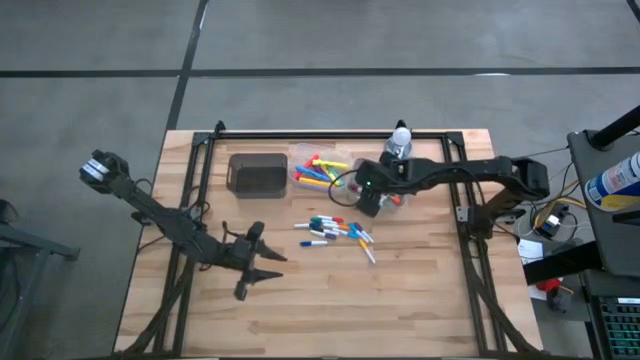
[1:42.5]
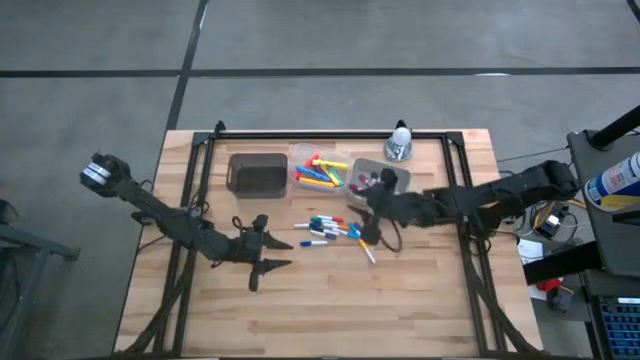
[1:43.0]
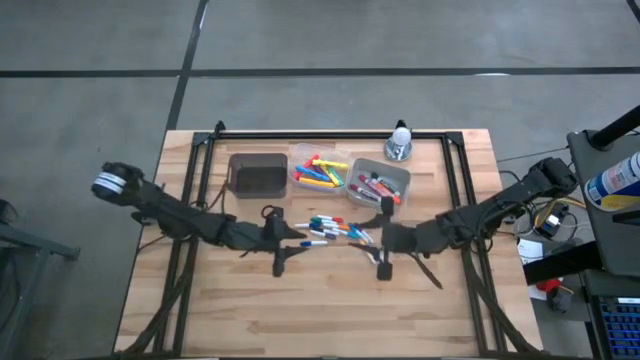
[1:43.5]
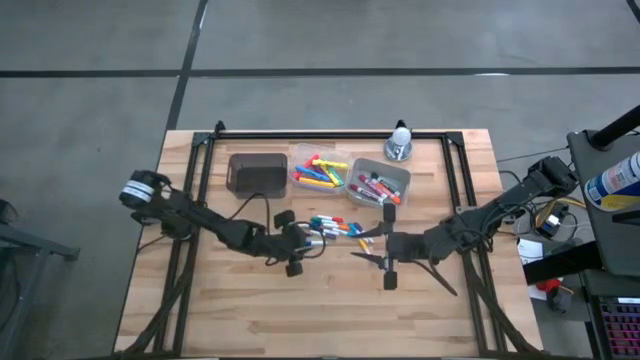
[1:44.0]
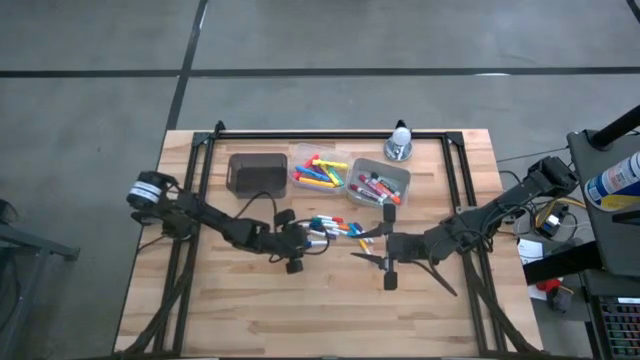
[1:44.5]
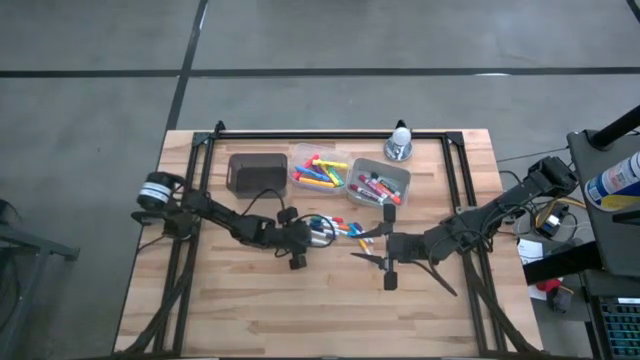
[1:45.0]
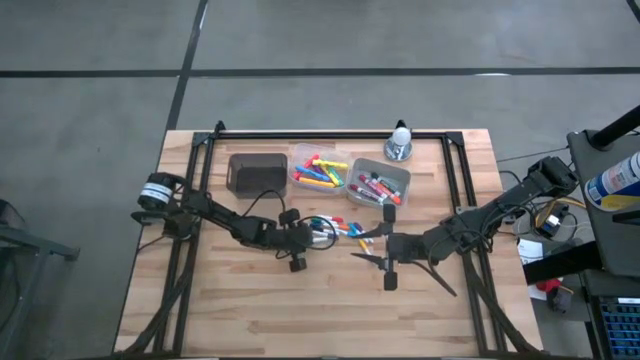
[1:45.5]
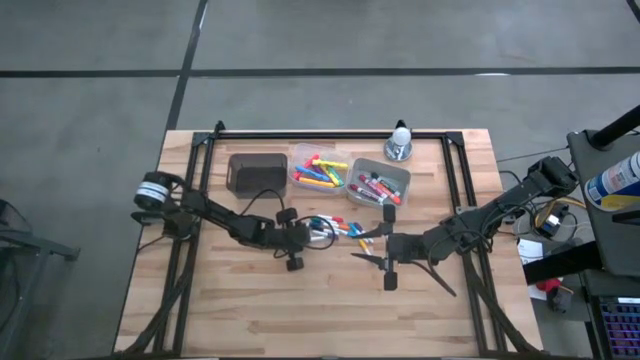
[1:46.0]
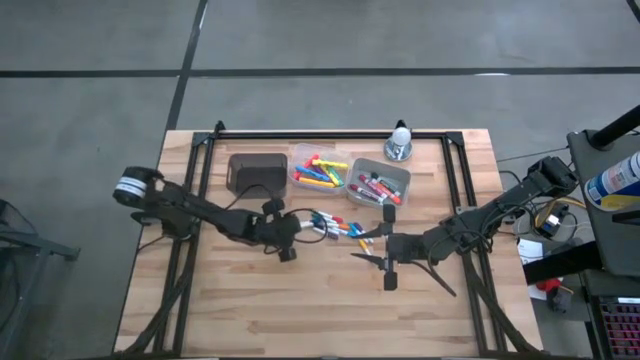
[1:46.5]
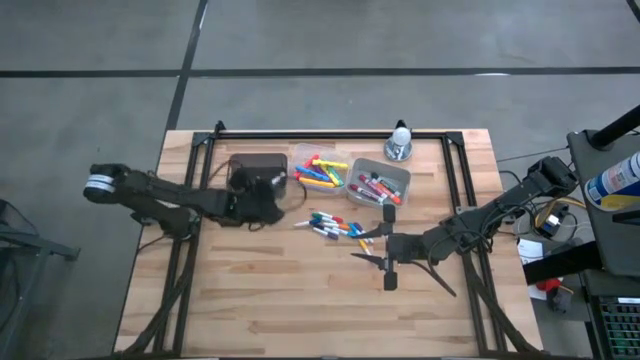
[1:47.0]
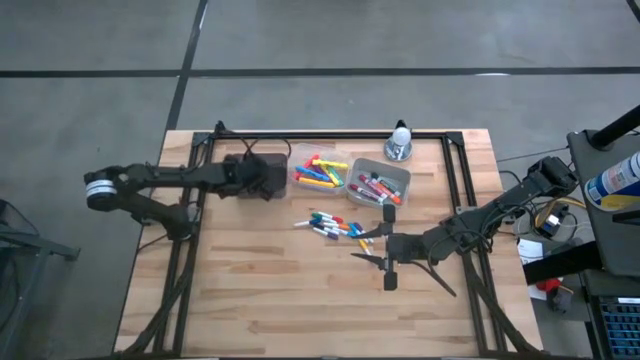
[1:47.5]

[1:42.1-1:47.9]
Task: Pick & Place Markers
Put the blue mini marker into the black bin

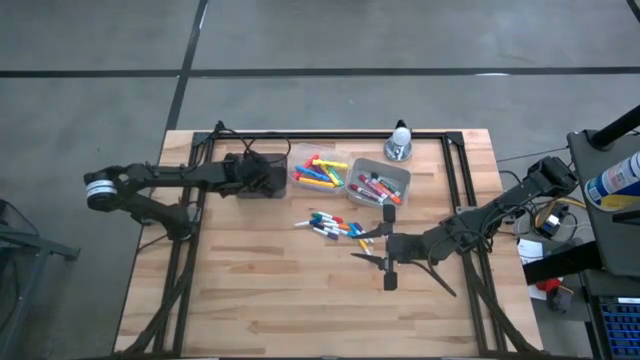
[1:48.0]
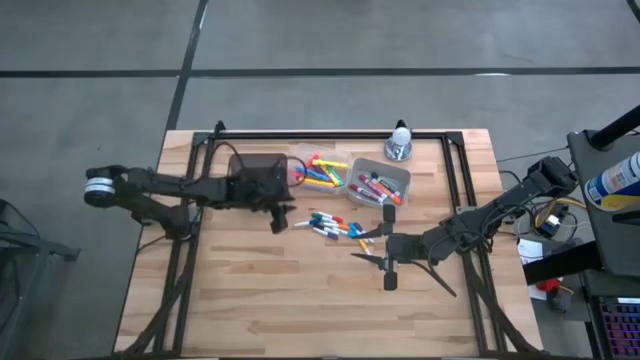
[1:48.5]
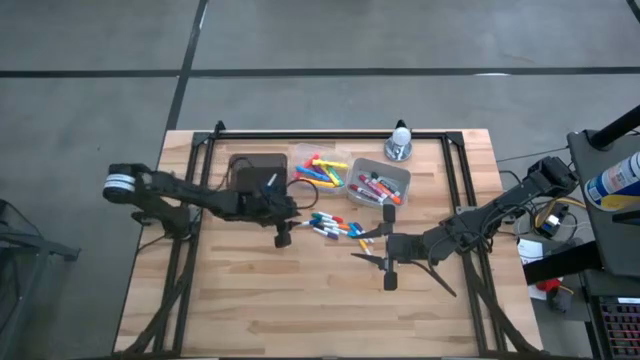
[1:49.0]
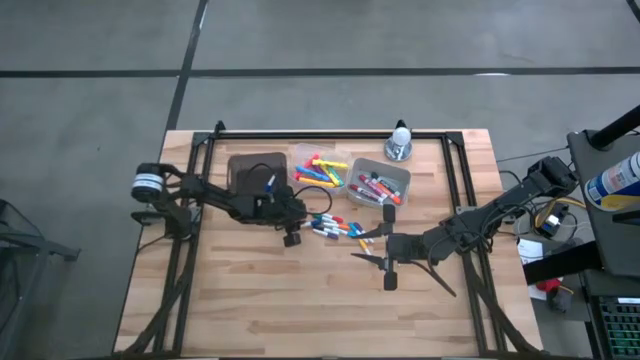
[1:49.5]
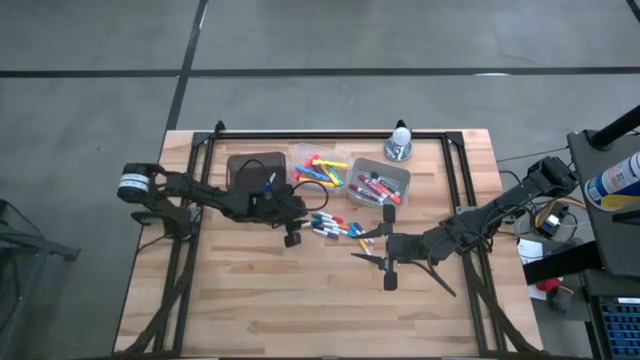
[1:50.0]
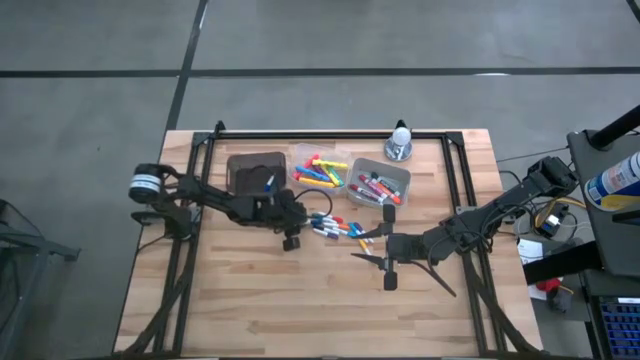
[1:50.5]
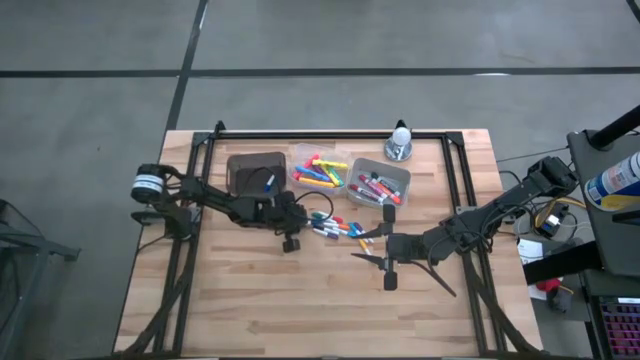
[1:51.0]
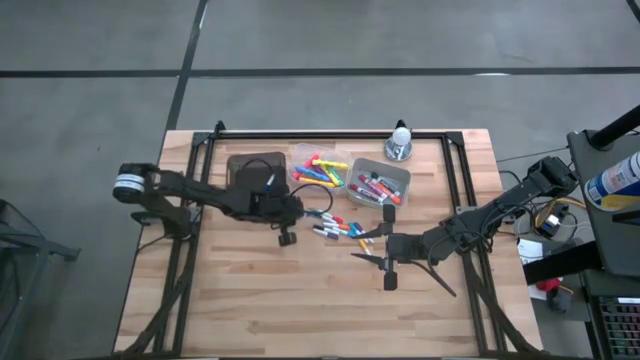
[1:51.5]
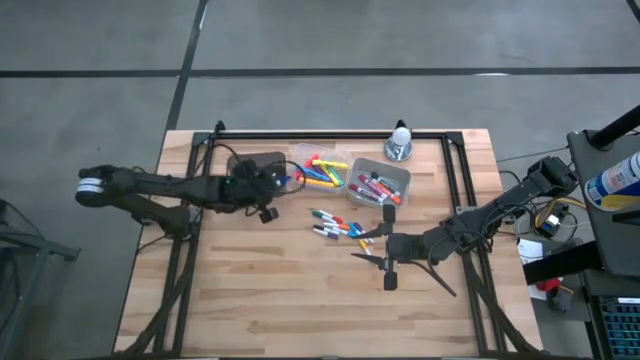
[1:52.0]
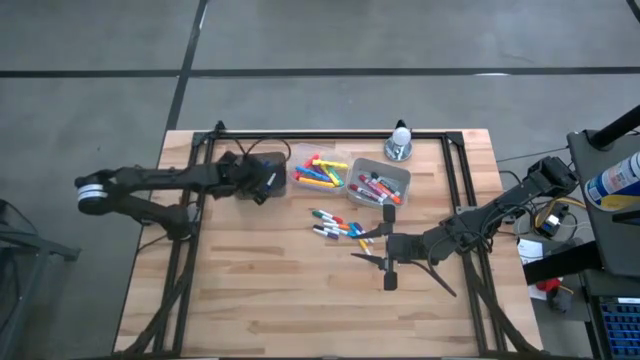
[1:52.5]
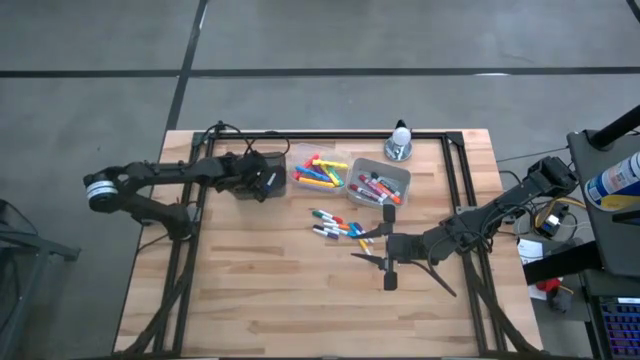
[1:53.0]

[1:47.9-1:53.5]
Put the blue mini marker into the black bin

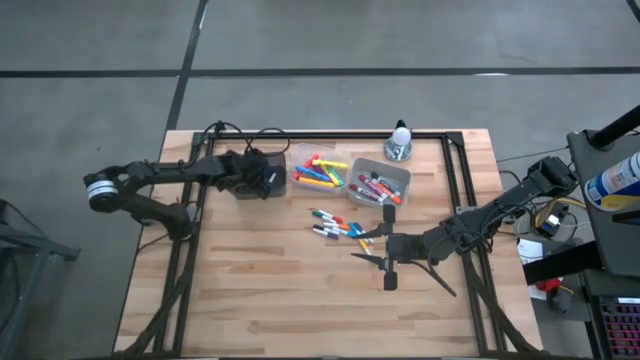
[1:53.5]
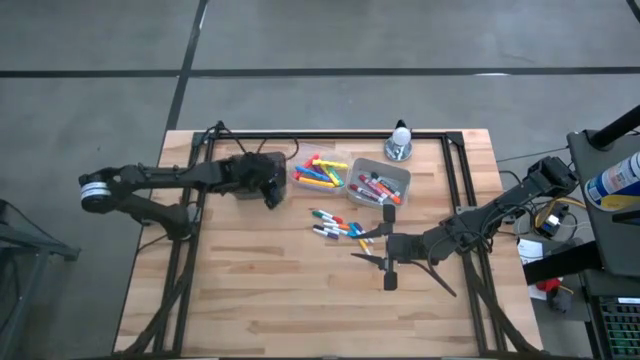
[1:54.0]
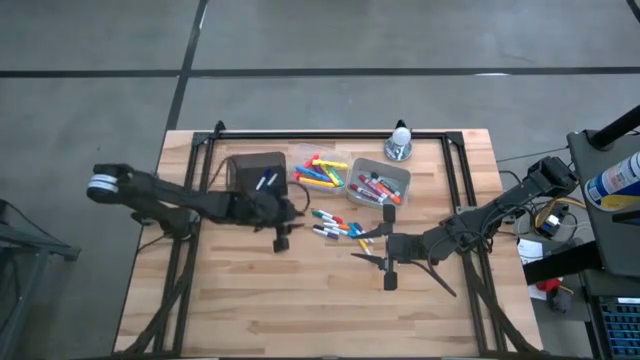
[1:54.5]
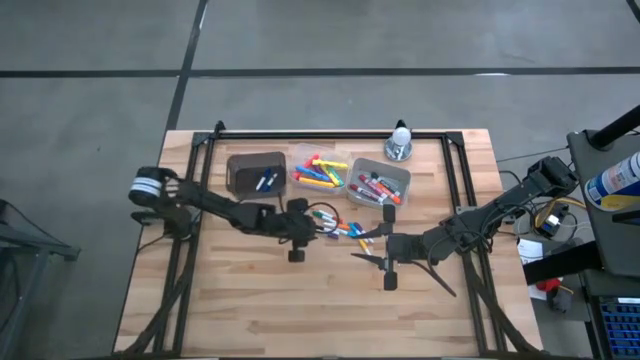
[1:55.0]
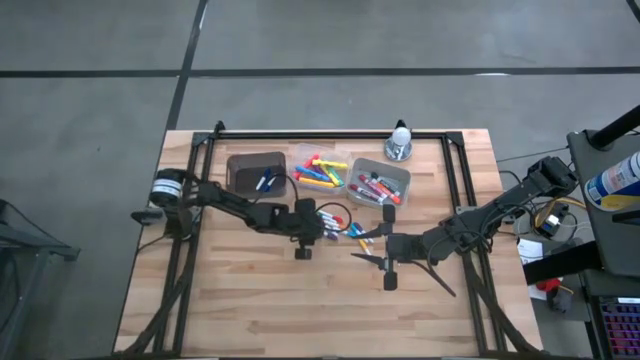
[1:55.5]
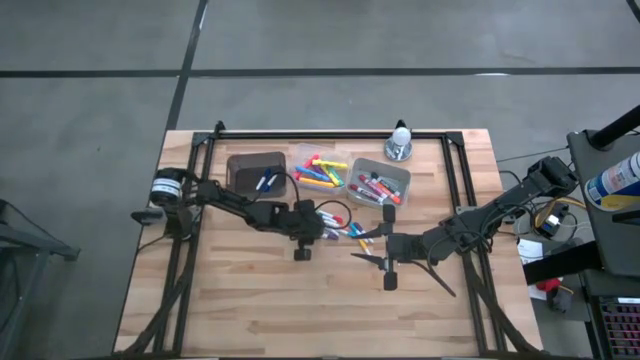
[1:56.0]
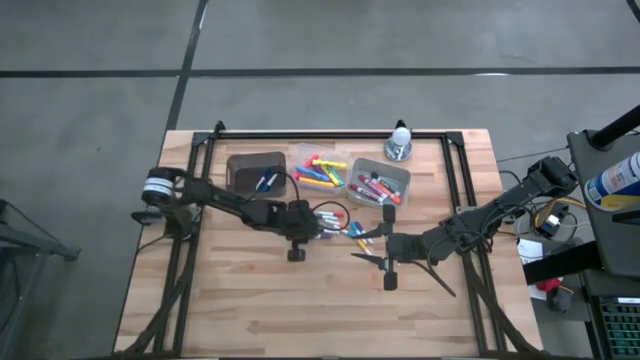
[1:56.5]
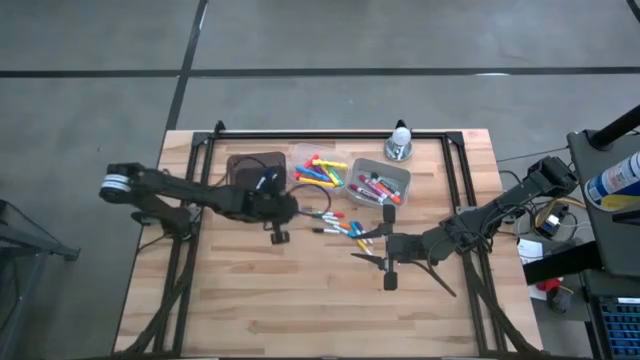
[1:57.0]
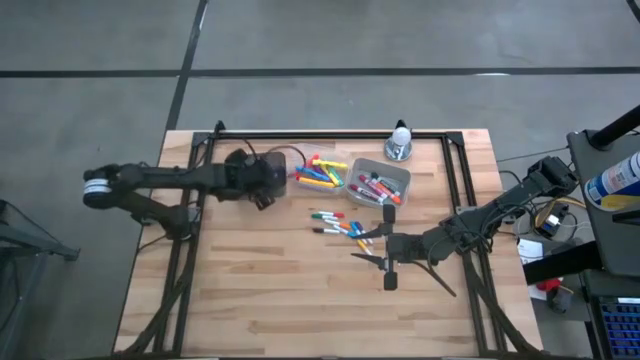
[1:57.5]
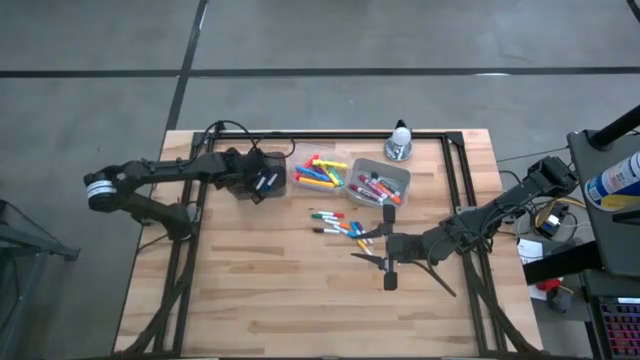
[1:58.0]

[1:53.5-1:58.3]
Put the purple mini marker into the black bin

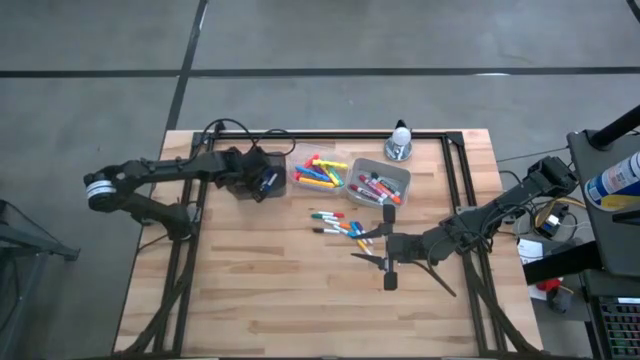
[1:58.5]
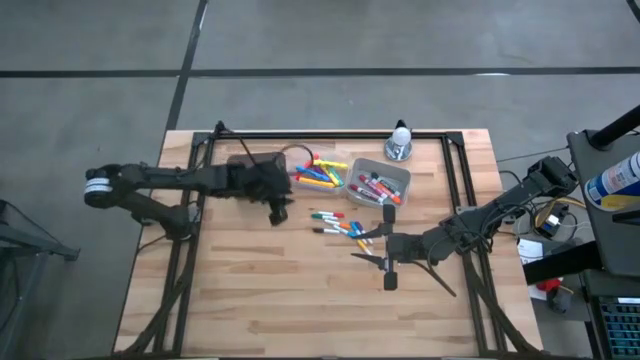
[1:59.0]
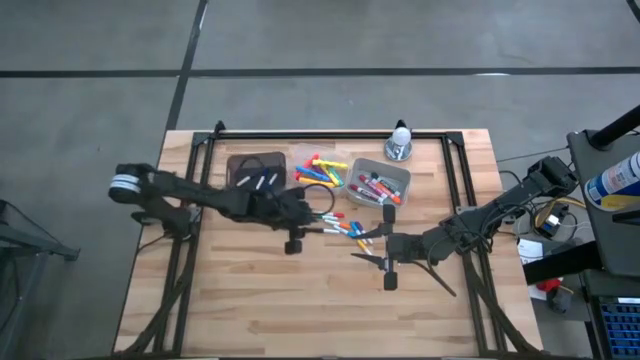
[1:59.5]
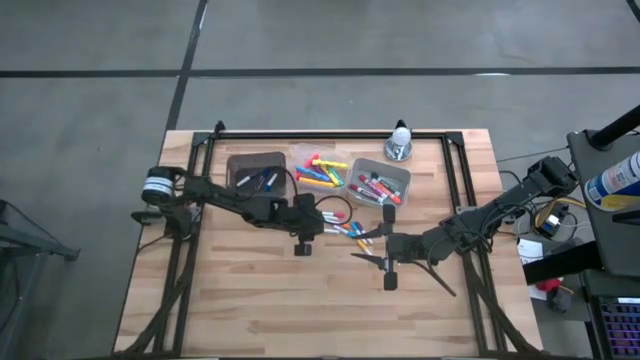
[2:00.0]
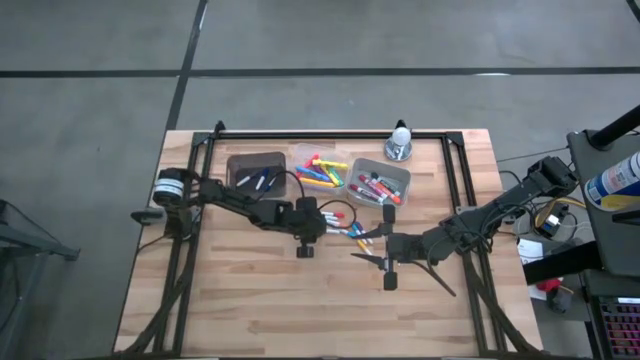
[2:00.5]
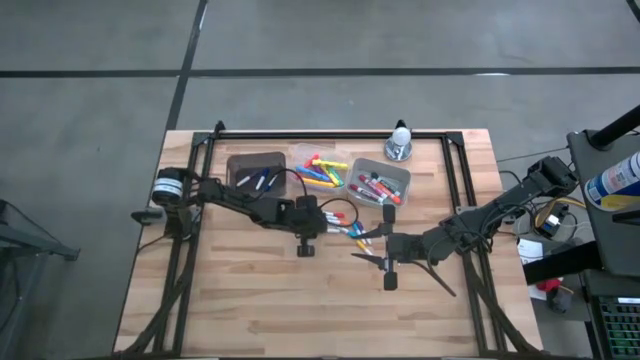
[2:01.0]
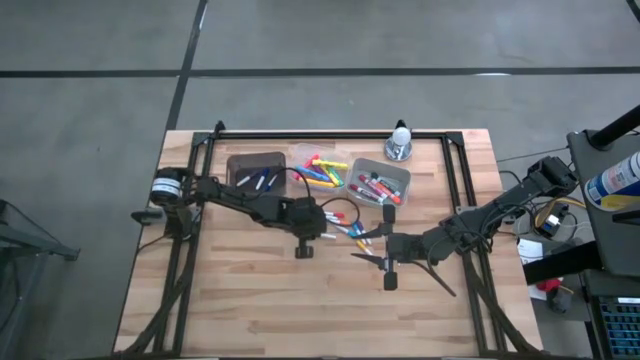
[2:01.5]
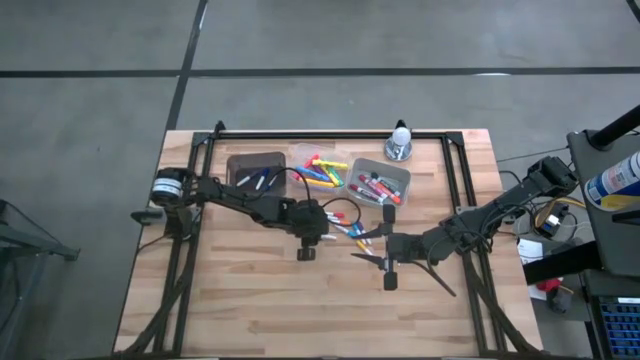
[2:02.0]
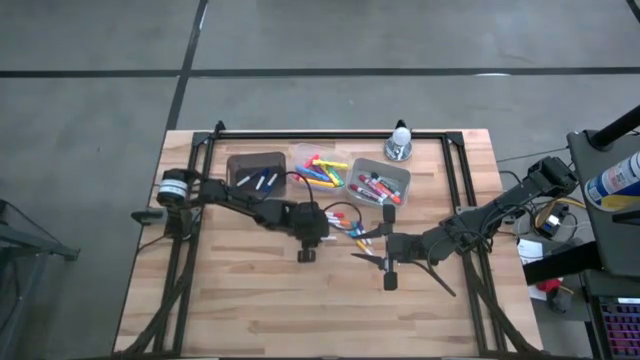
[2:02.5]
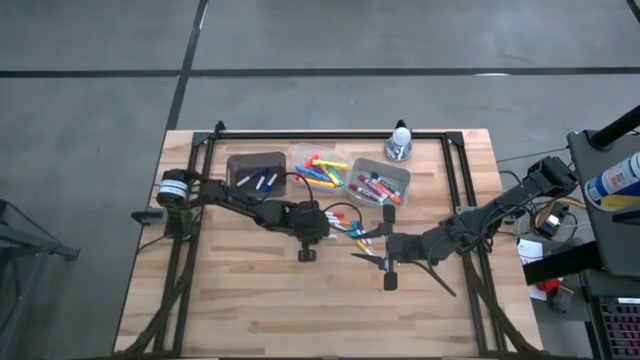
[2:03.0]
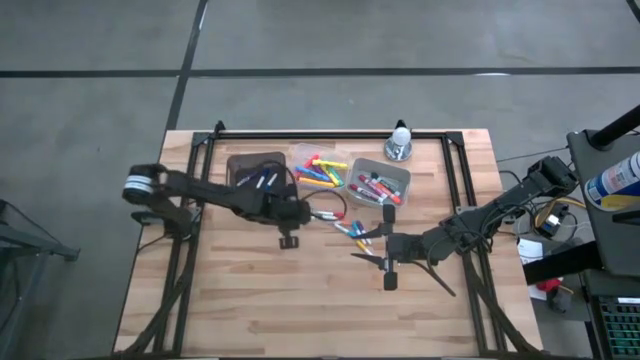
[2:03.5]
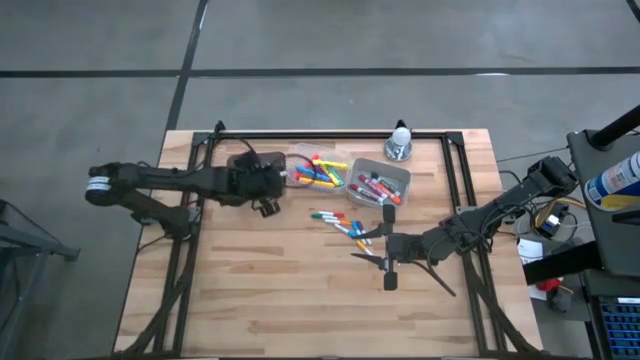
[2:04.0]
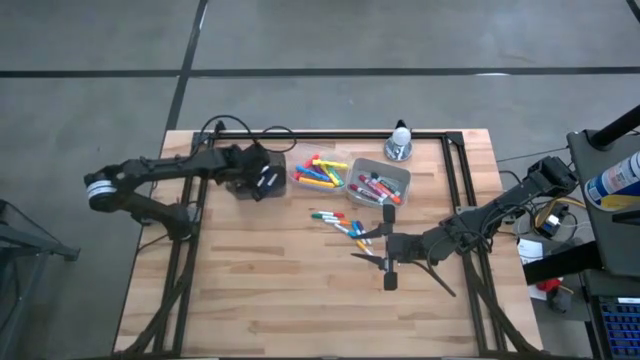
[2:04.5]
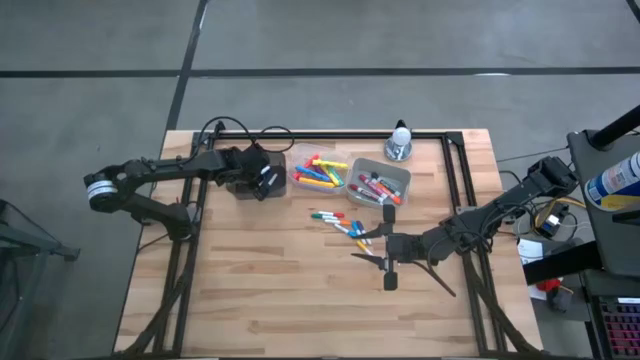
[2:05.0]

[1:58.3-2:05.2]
Put the black mini marker into the black bin
